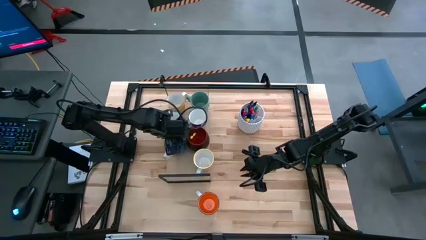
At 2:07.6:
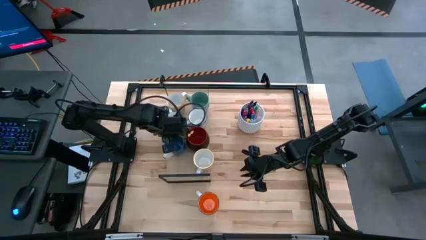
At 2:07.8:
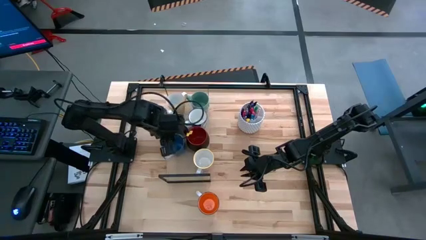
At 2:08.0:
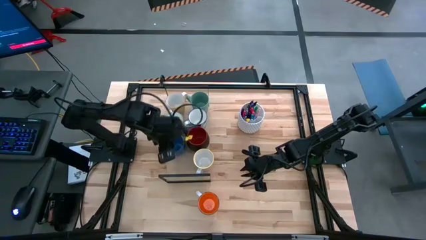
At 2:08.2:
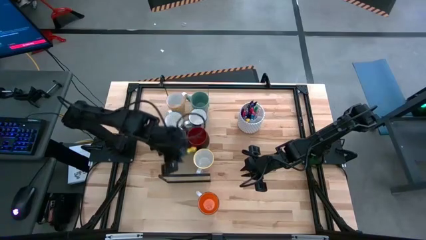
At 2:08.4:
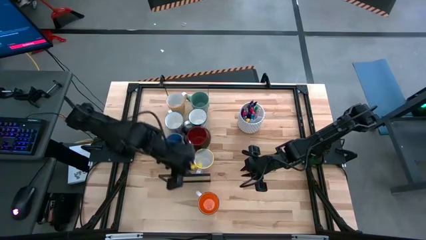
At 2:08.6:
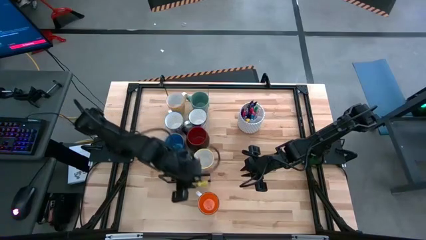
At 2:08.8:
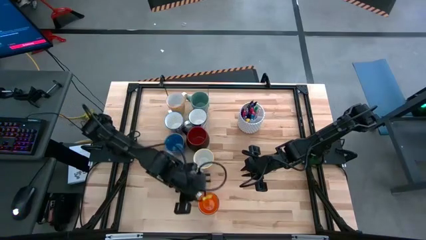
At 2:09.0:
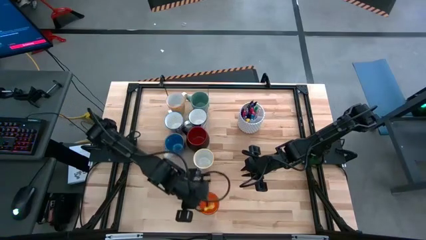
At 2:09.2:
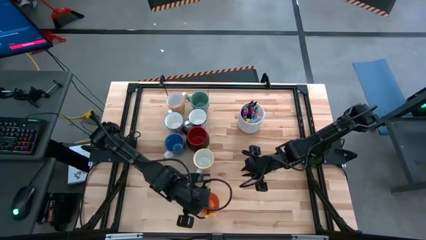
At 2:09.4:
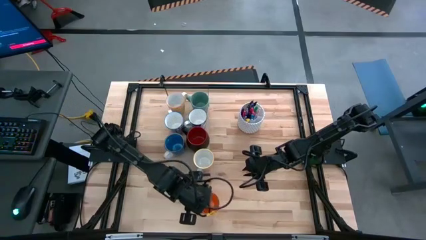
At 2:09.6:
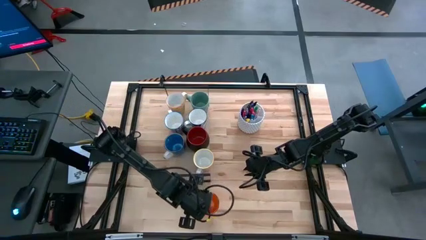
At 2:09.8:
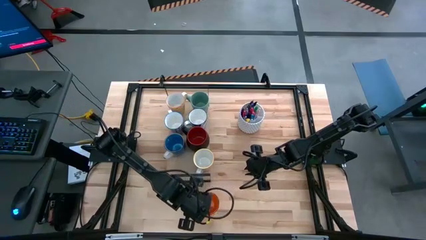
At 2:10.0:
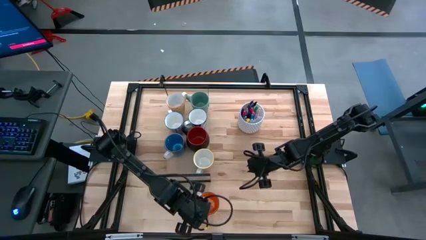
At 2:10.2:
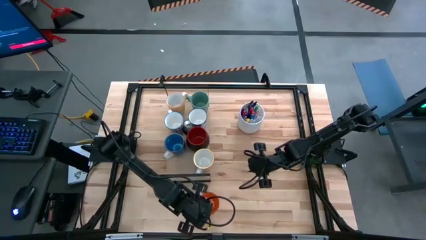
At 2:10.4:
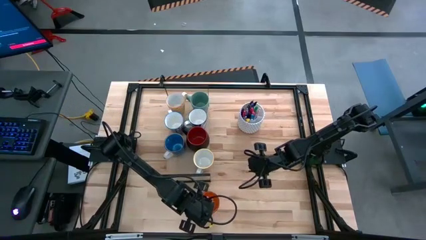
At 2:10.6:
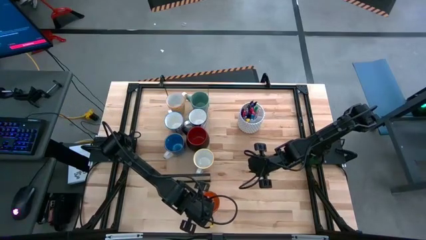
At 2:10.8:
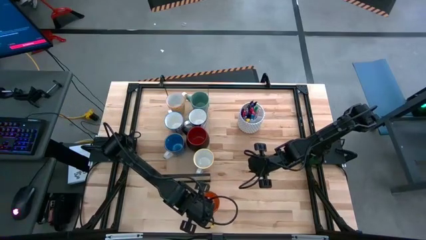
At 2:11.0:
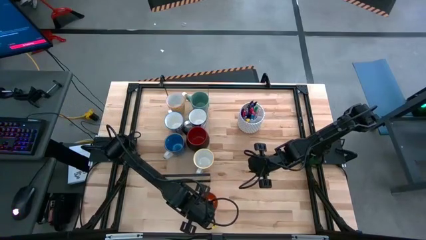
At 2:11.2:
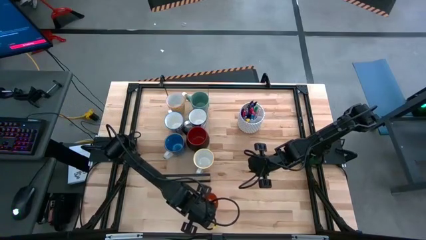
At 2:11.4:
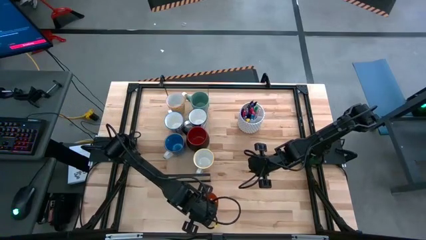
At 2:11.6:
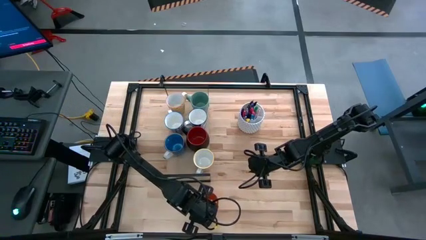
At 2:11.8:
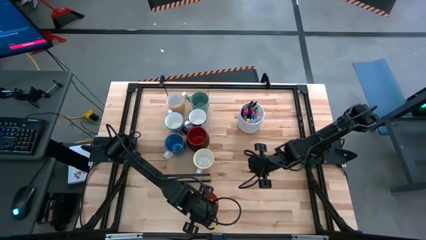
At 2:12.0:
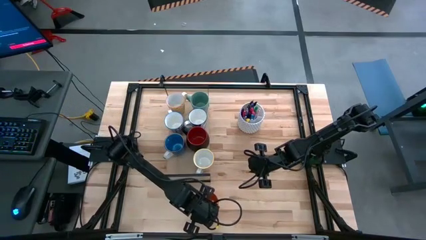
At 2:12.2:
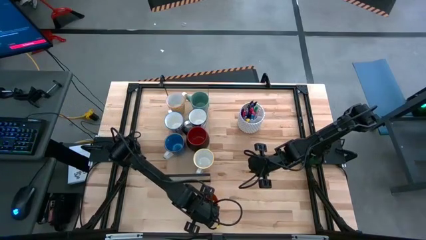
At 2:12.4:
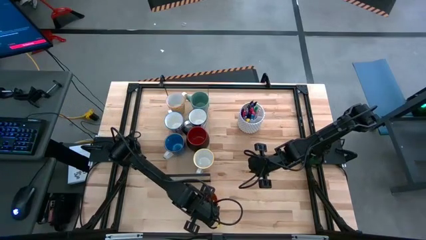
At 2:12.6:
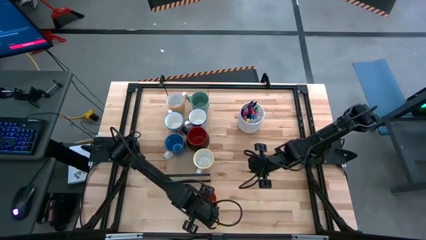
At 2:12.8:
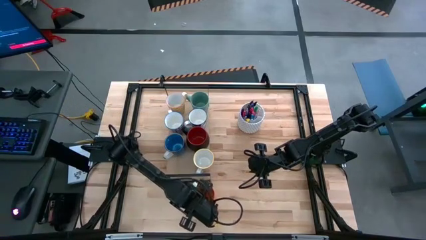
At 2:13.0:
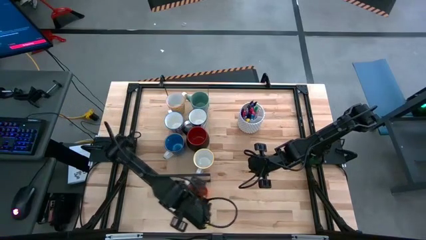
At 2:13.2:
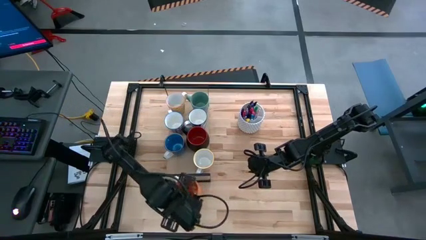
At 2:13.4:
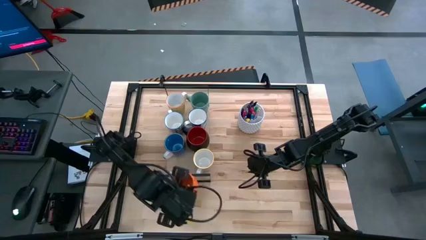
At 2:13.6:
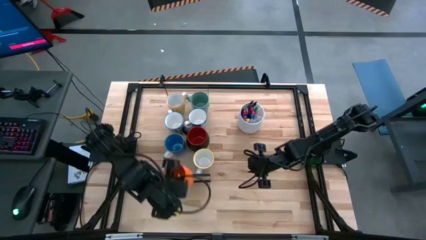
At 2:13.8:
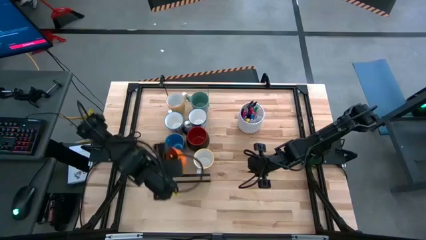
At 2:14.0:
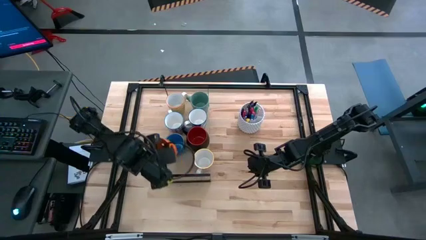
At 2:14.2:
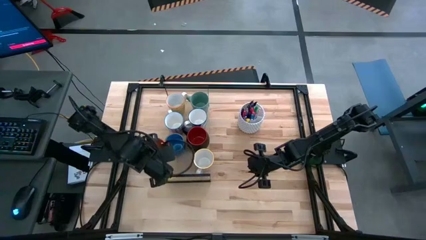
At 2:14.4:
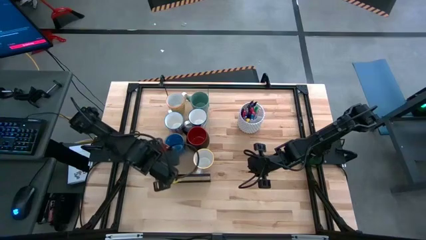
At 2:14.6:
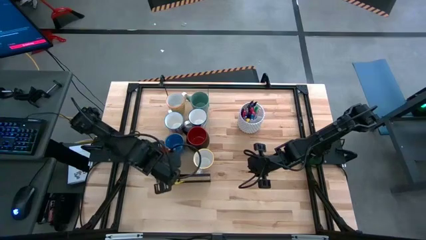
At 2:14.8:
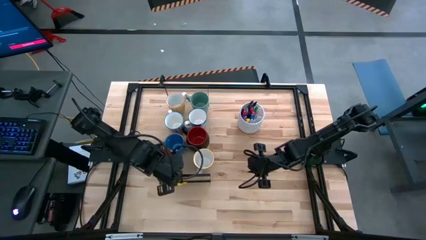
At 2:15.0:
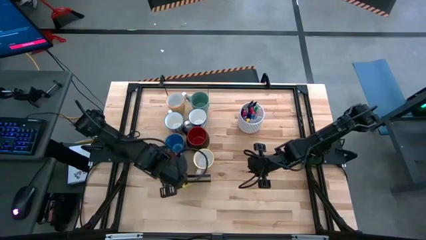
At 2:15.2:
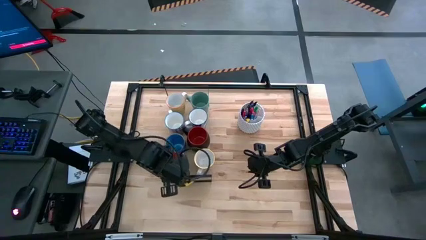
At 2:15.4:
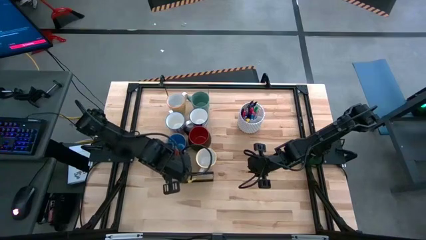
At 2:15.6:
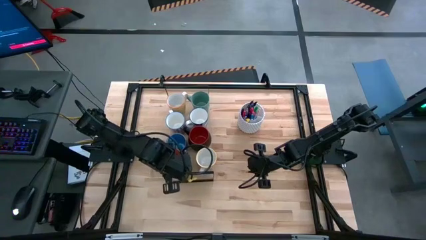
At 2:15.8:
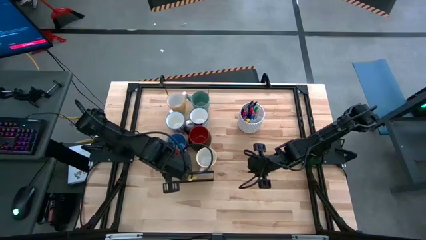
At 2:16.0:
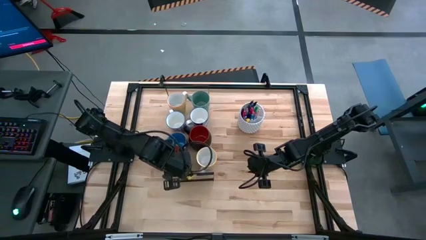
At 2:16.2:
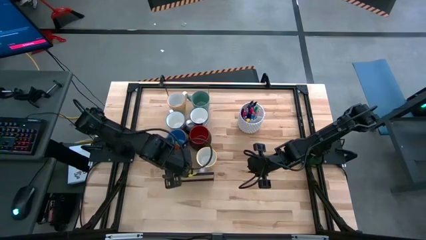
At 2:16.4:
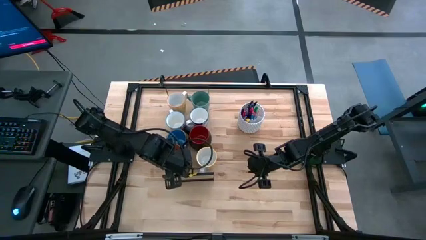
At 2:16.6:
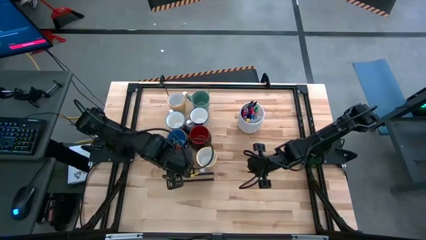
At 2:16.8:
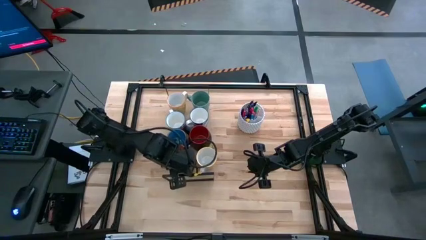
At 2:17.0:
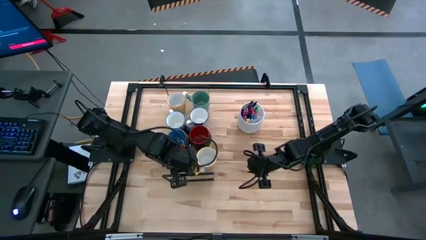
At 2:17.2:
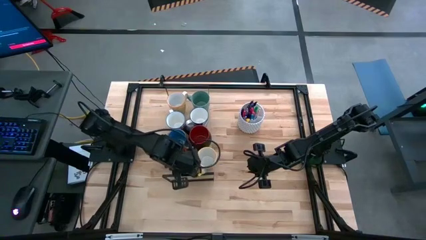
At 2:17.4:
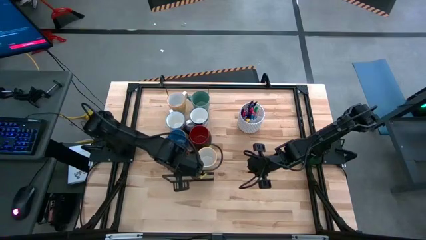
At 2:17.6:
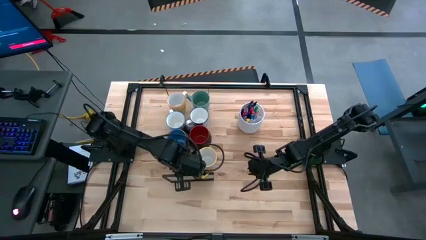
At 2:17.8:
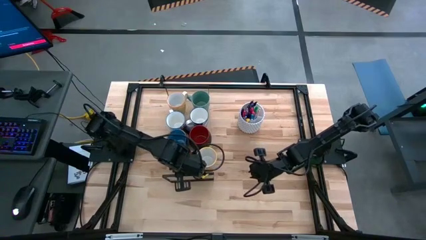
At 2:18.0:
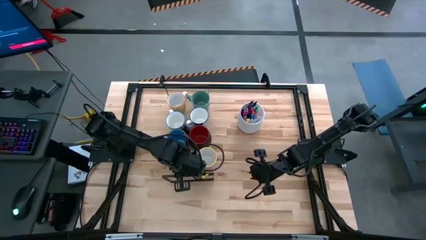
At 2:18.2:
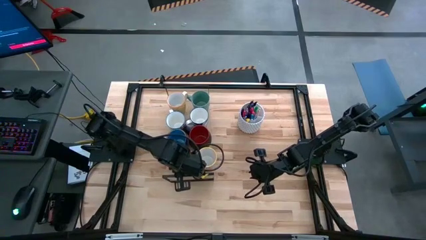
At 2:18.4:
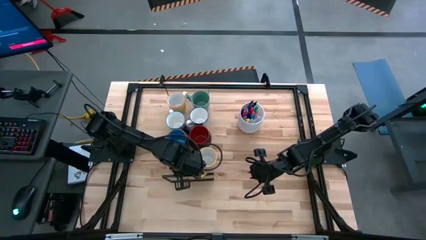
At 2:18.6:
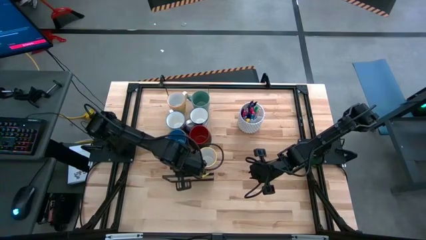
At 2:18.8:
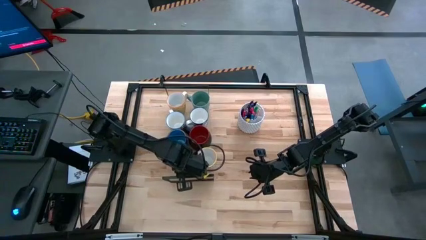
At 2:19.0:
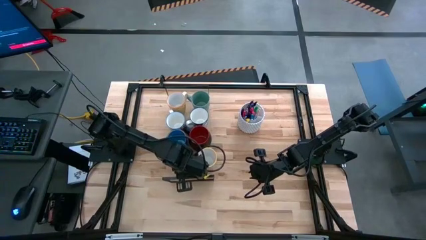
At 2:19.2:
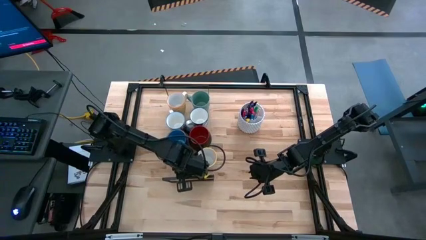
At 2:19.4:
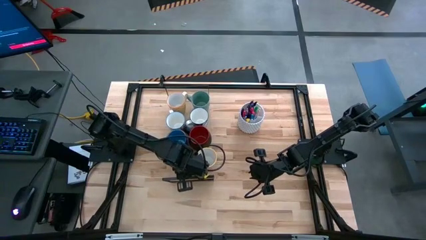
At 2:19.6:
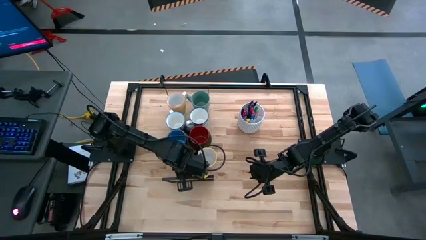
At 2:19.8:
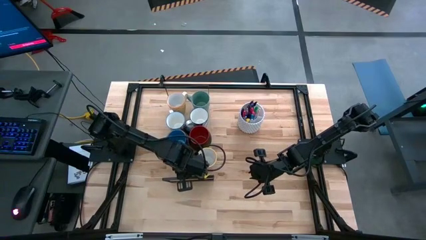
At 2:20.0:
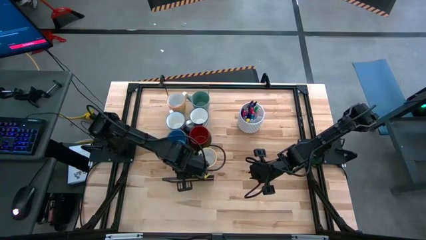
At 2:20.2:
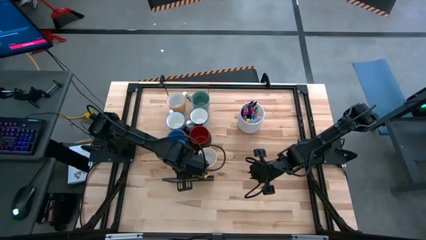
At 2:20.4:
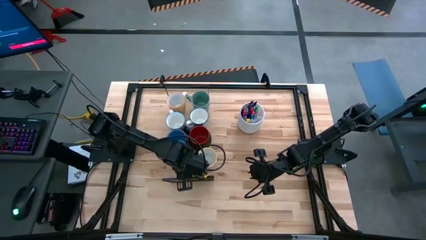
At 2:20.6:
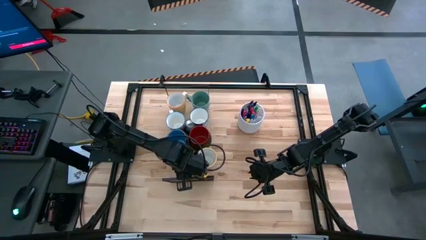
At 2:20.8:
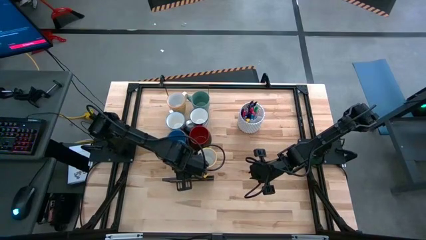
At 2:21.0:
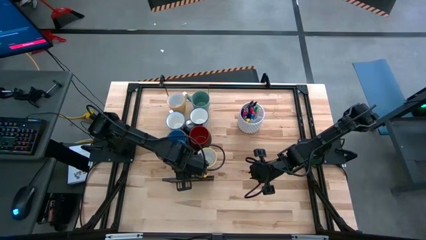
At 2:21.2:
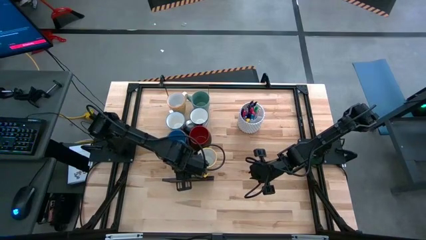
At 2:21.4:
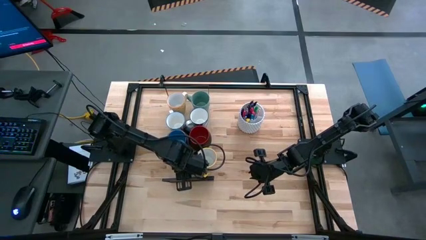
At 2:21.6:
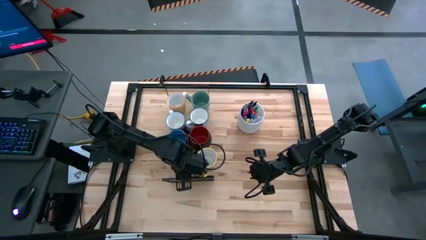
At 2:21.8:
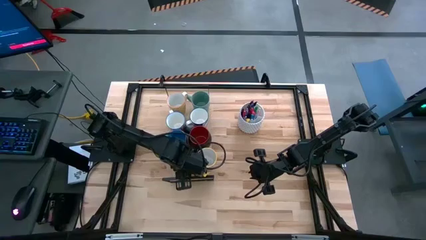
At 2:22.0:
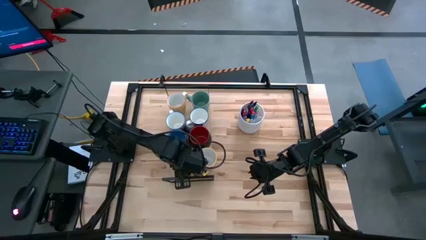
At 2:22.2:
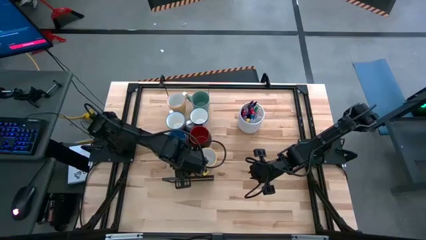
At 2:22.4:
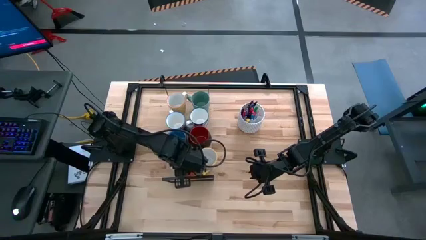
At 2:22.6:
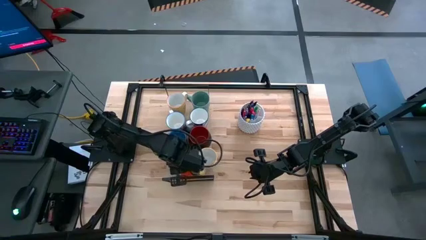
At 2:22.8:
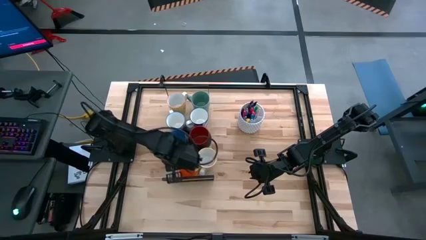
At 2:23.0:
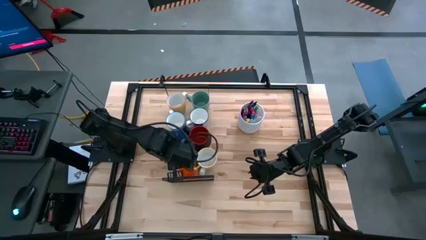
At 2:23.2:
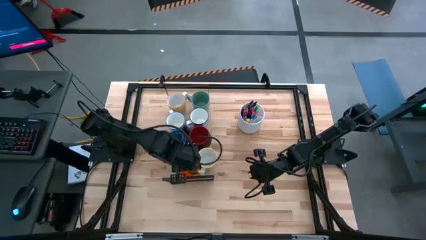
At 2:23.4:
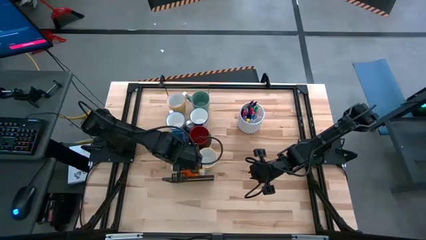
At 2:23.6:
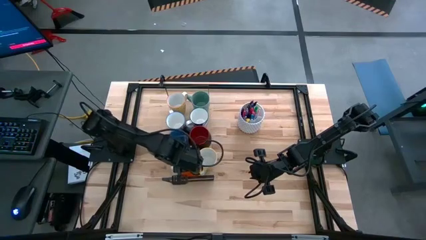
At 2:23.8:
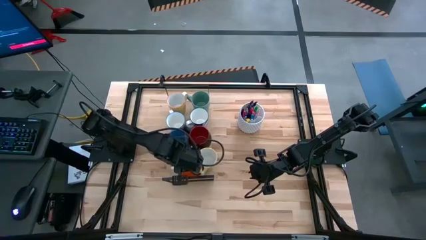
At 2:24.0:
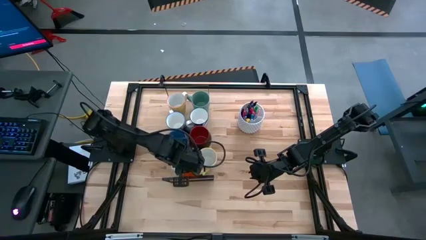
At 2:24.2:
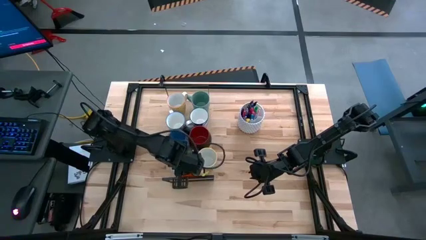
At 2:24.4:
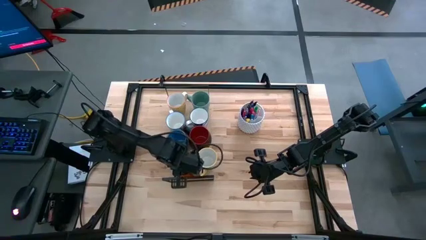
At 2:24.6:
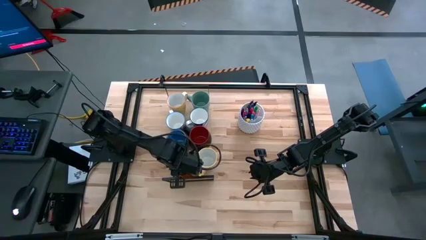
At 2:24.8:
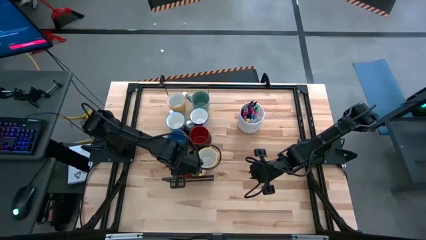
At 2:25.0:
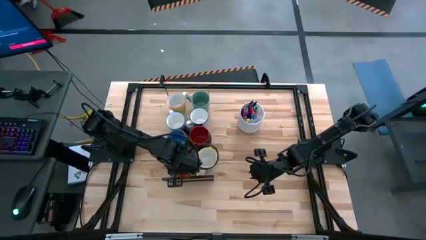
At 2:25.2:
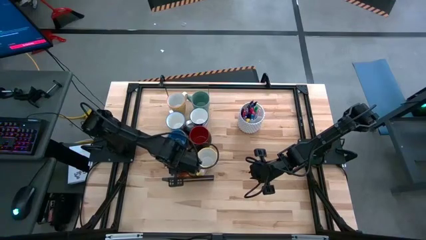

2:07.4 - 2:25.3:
Task: Place coffee mugs
Put the orange mug on the shelf
